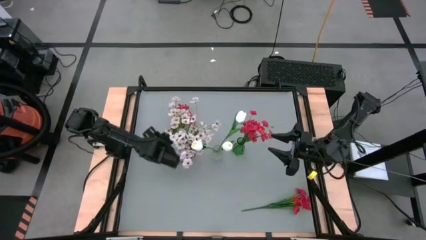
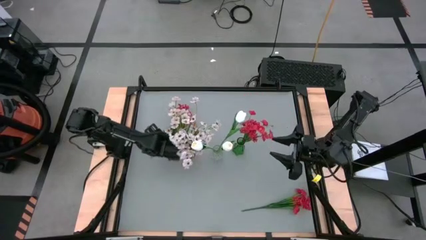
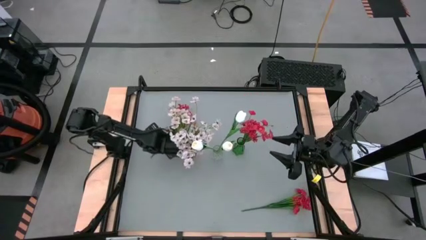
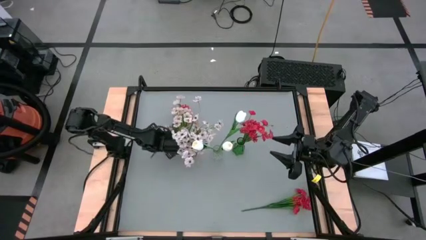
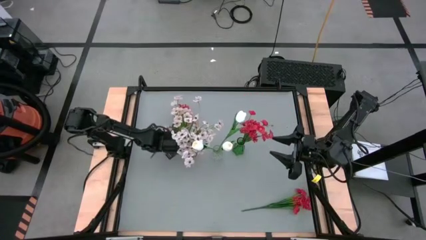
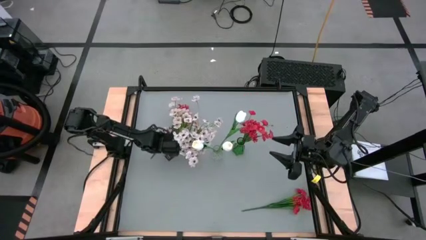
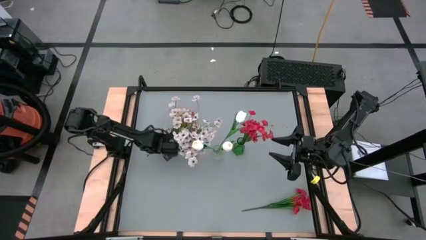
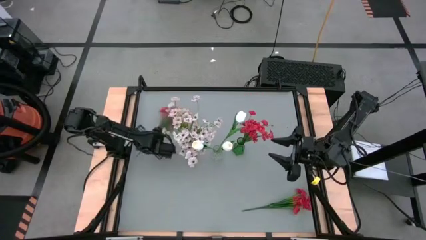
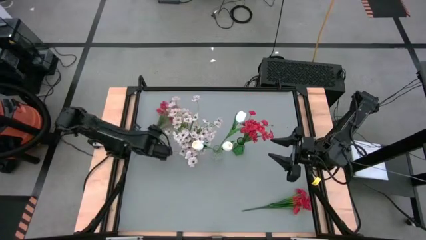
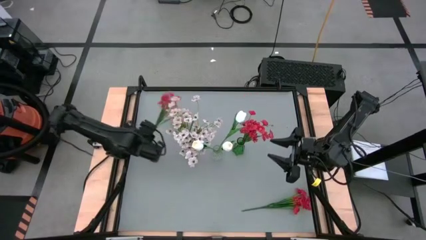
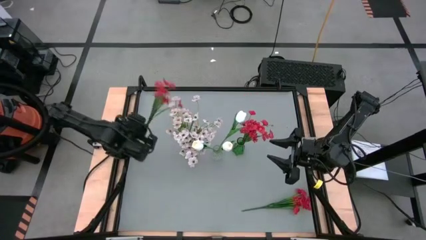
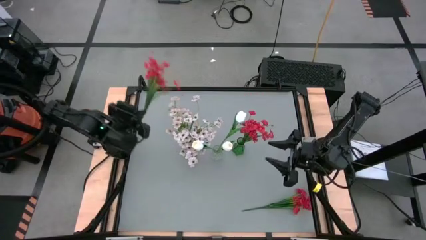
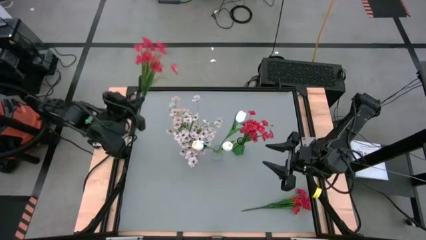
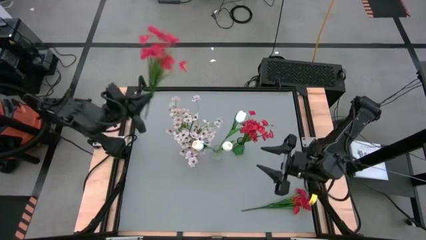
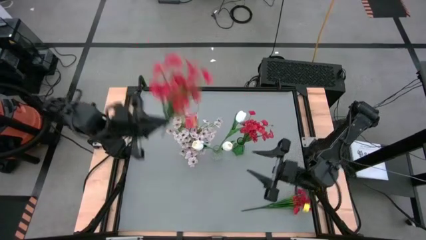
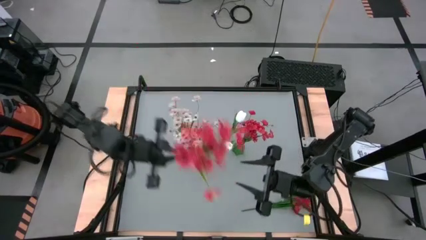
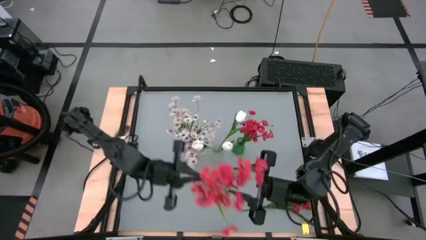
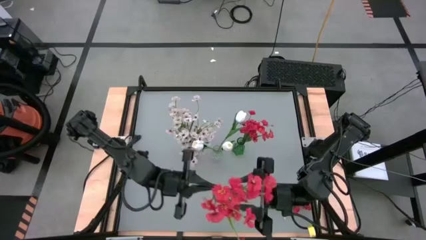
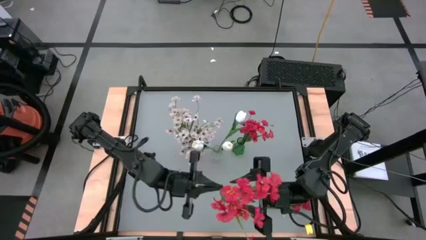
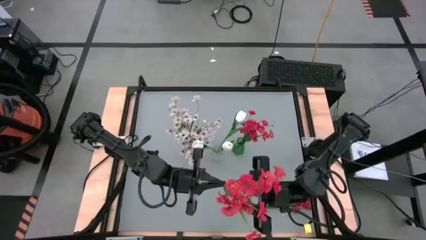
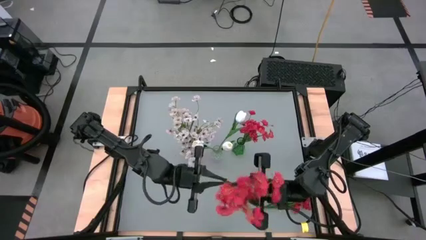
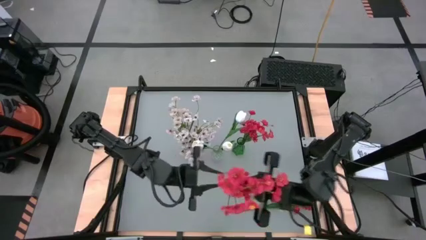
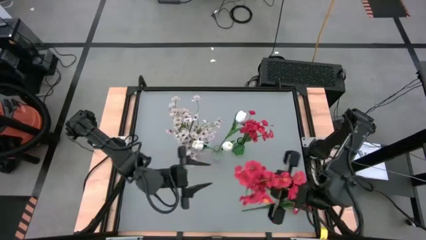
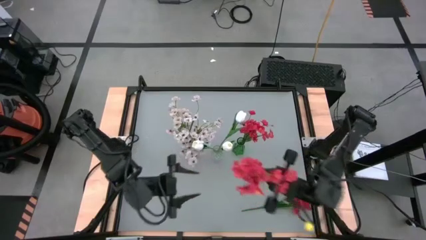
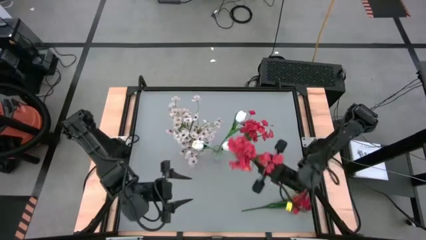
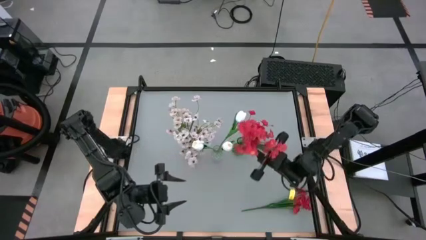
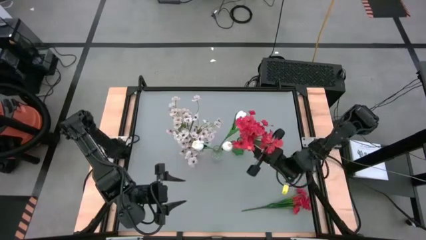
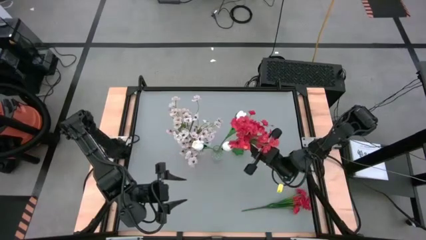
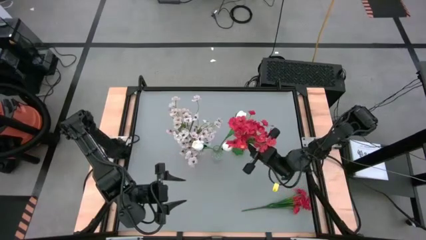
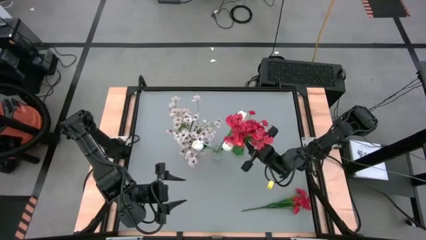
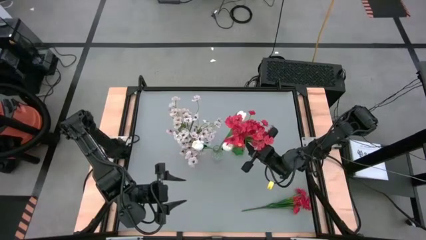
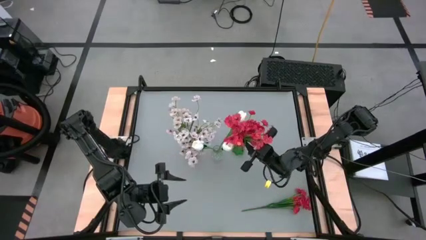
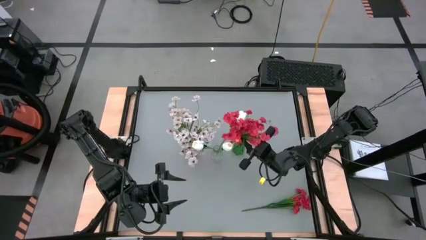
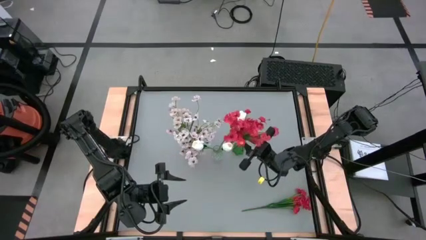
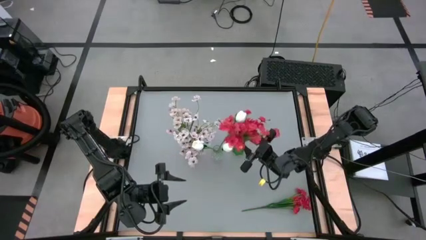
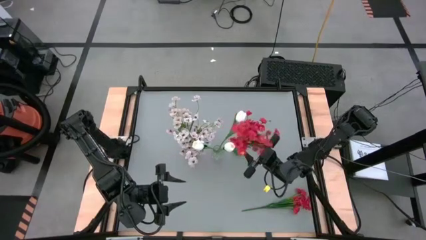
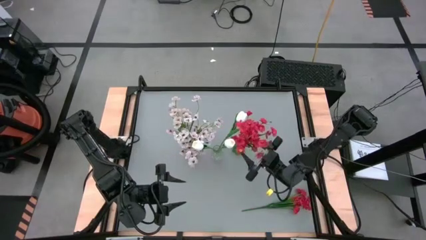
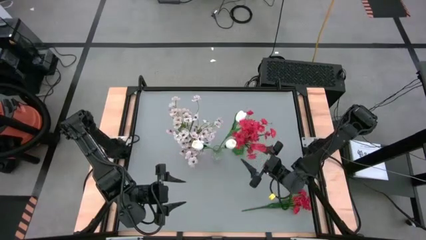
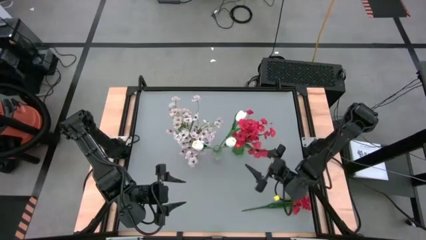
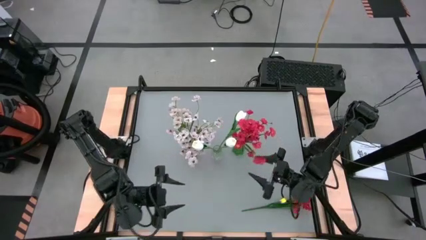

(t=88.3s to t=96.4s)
Task: Sort flowers into vase by color
Put the top red flower into the green flower vase

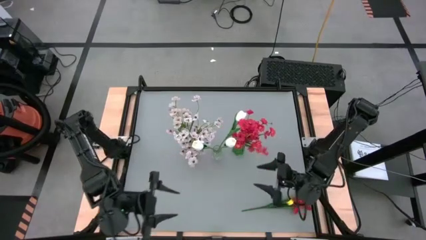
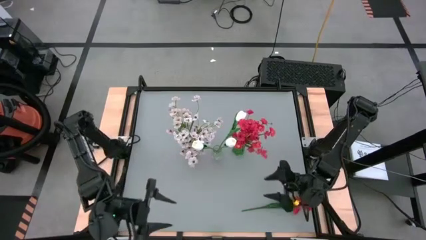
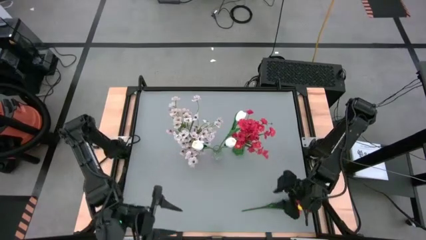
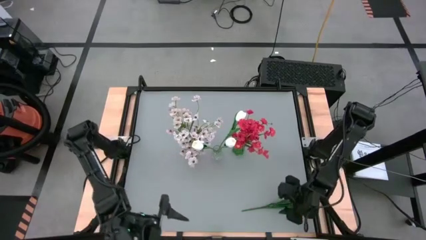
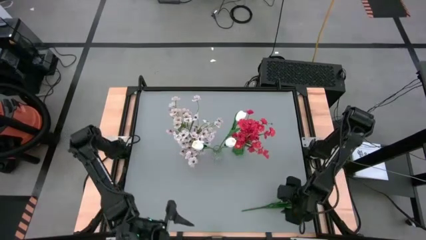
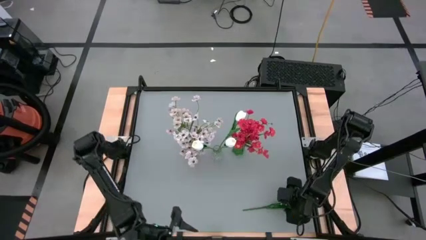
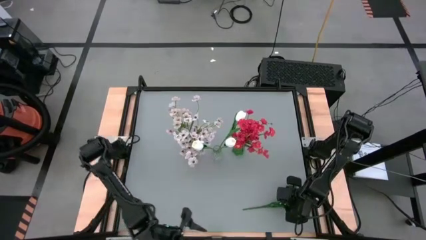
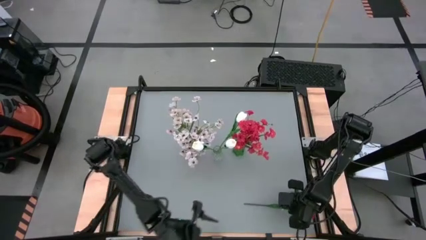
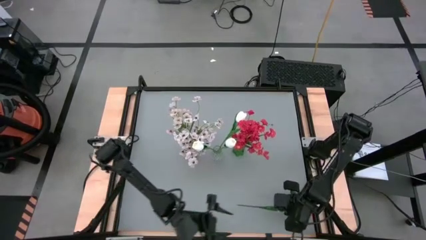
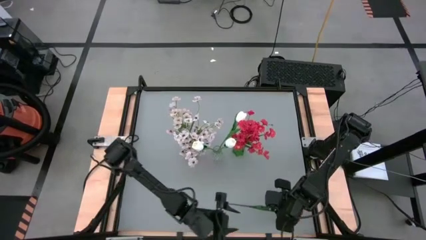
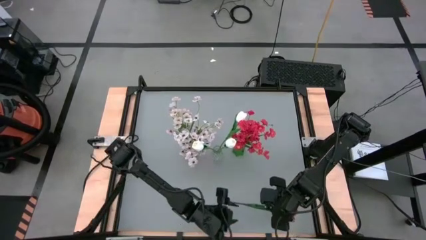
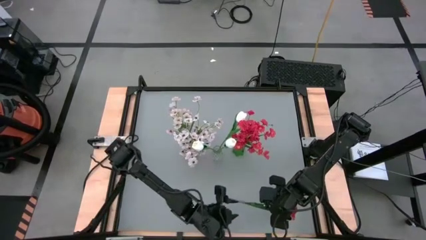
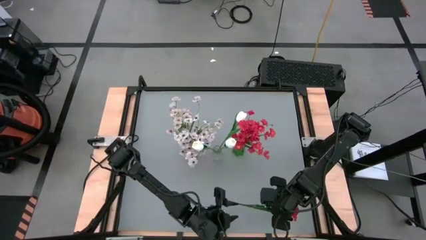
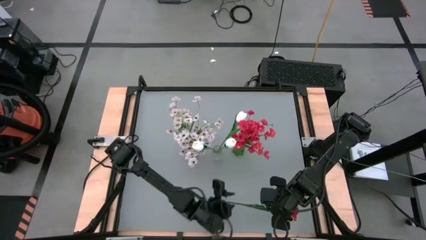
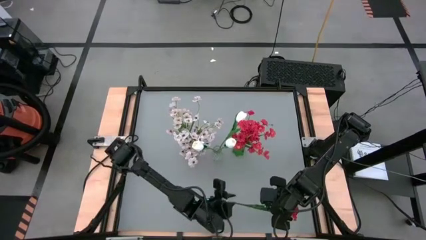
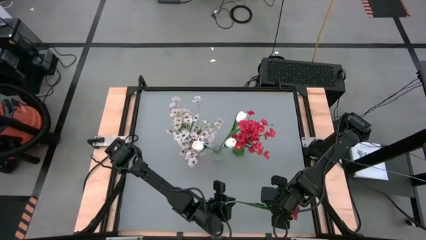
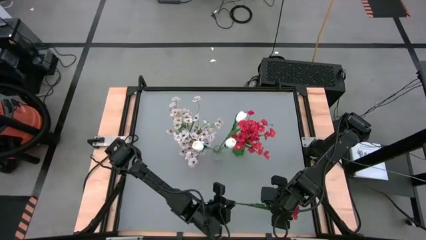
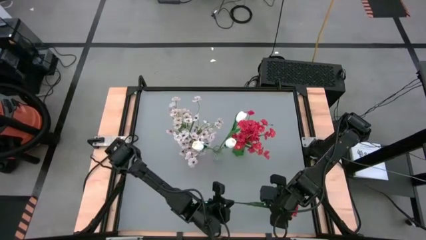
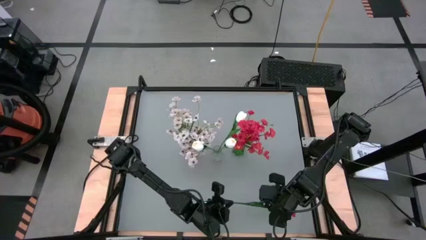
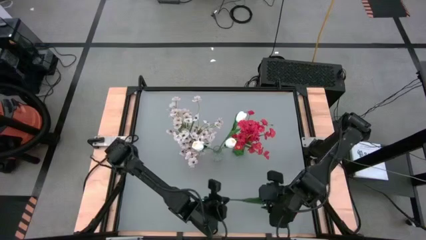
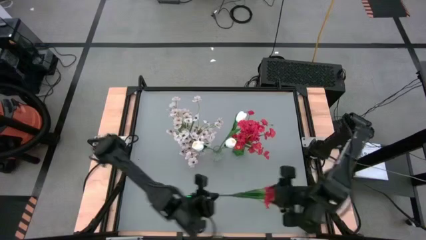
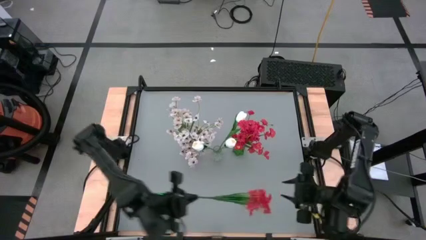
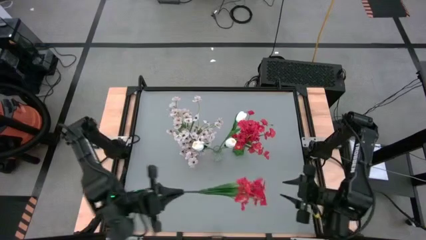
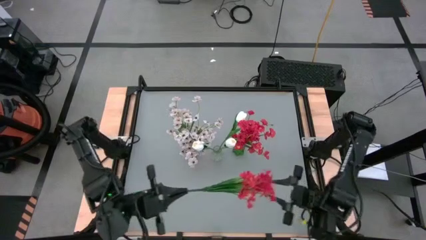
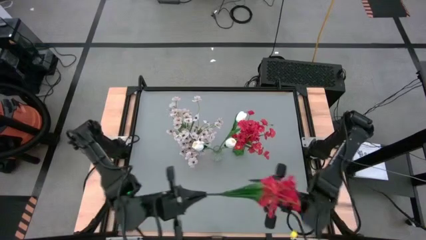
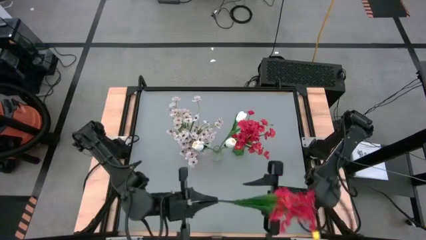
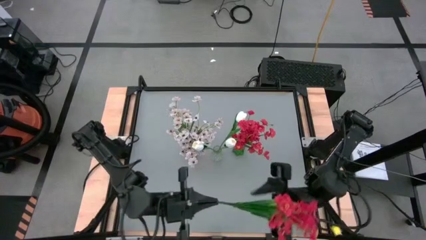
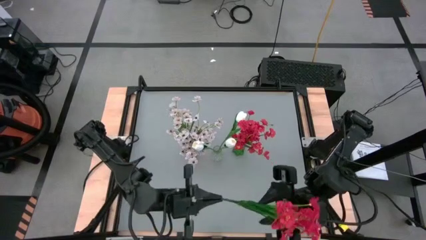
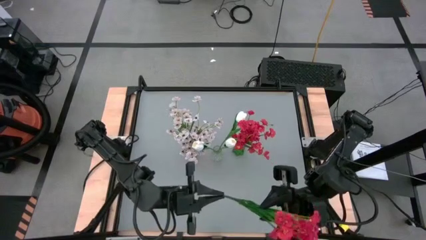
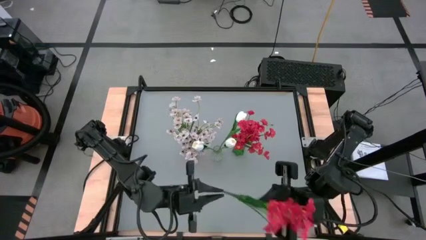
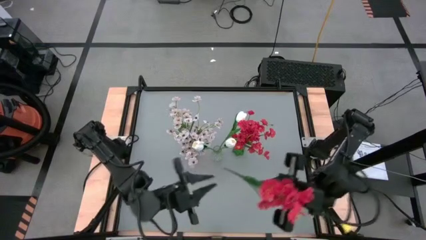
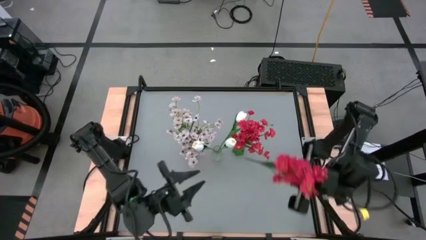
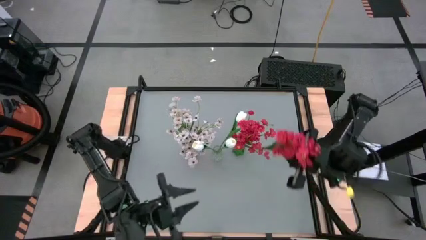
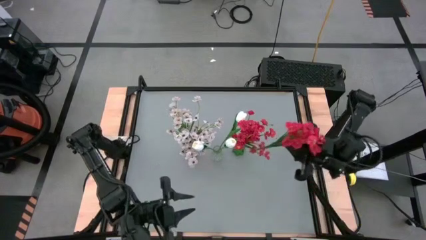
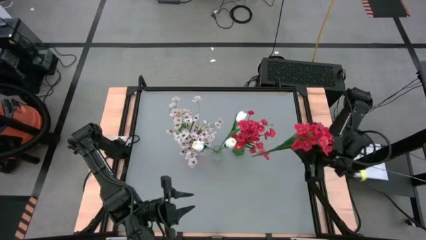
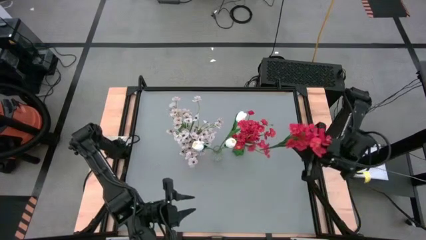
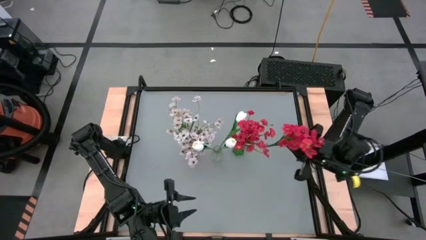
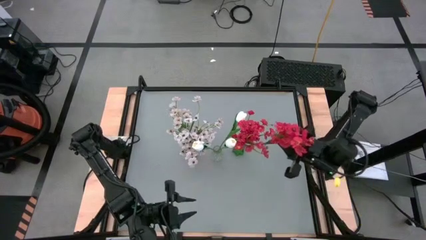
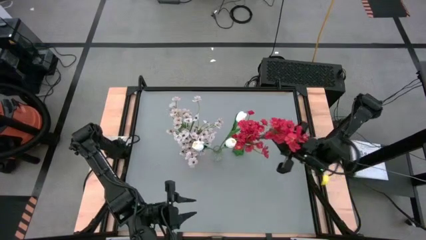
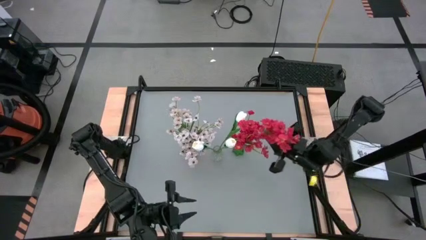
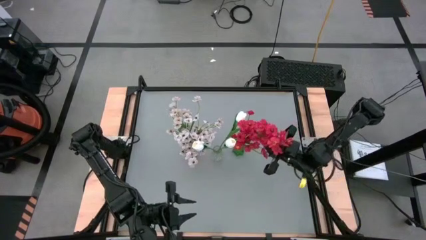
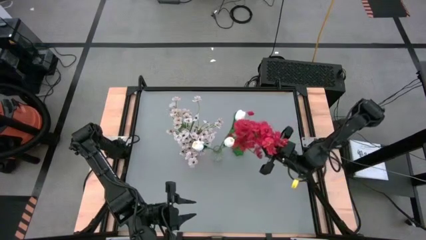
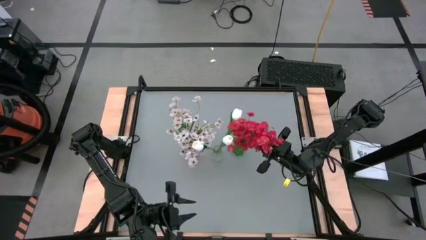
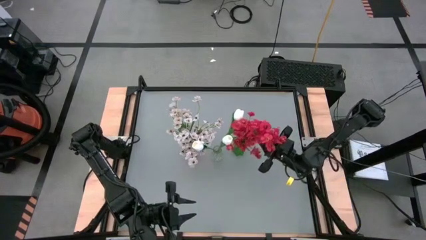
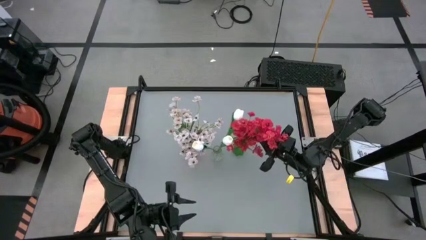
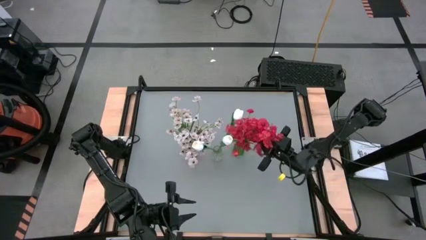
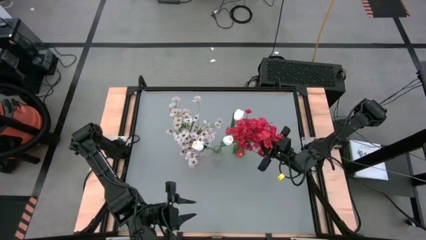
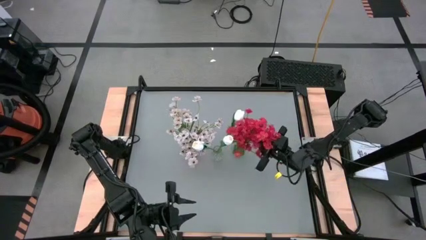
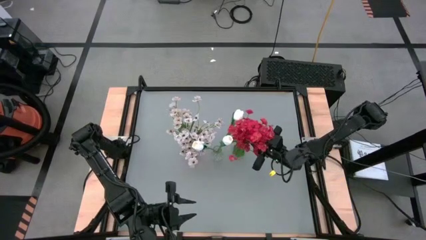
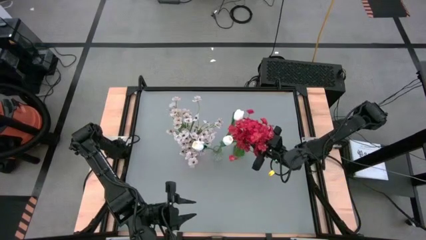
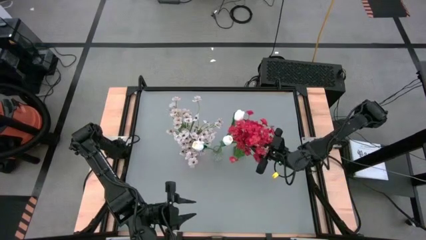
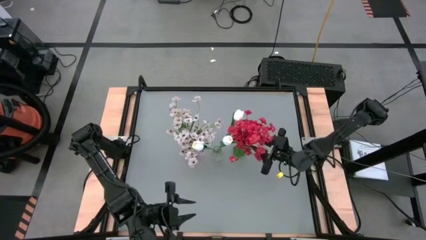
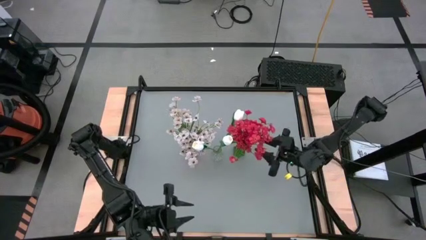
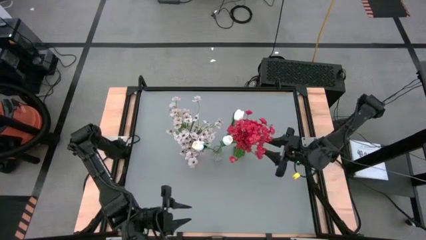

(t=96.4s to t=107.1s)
Put the red flower into the green flower vase
